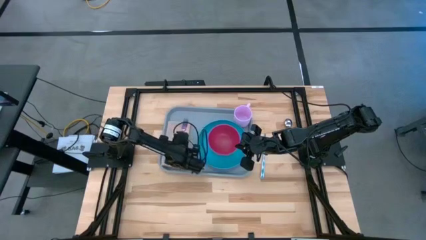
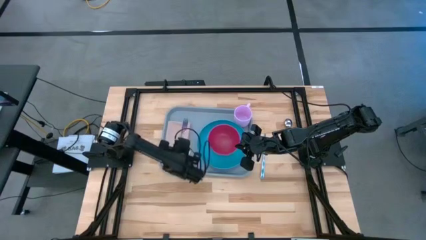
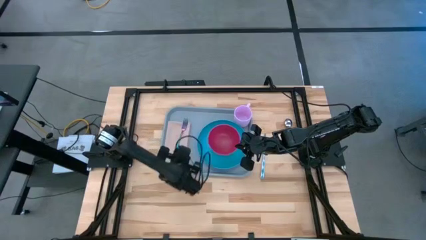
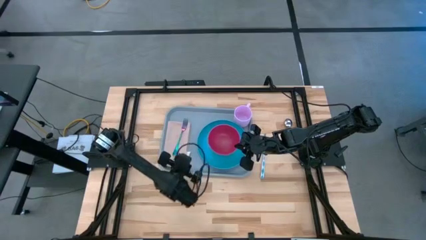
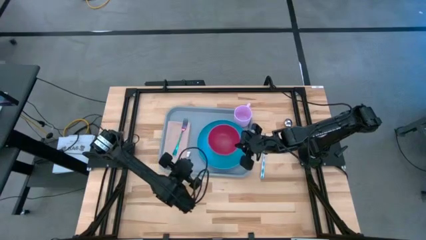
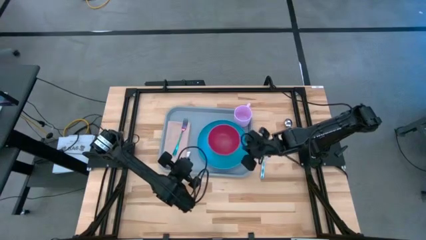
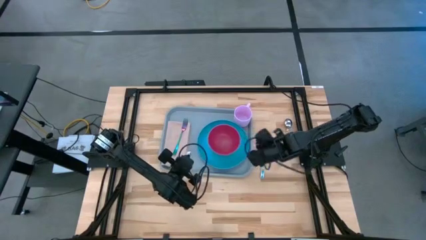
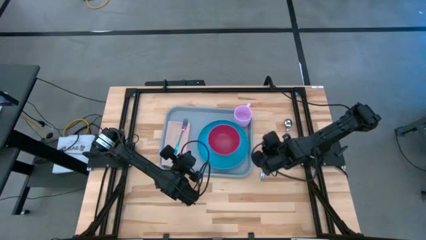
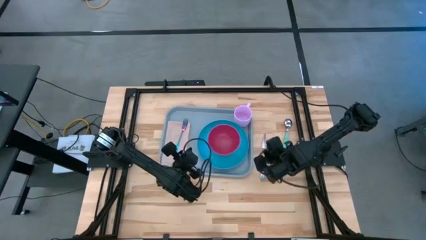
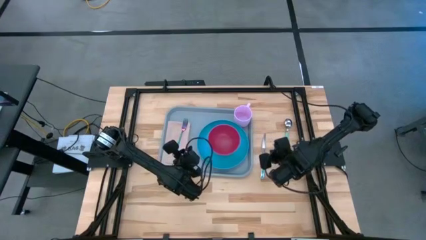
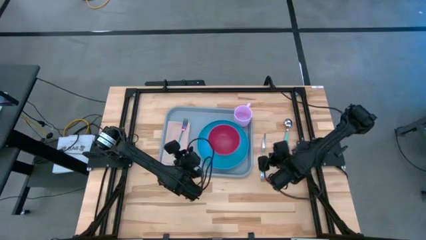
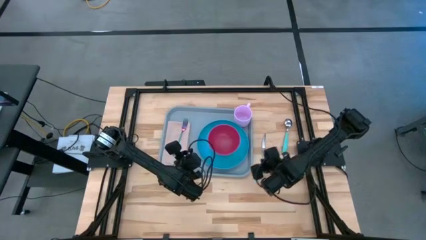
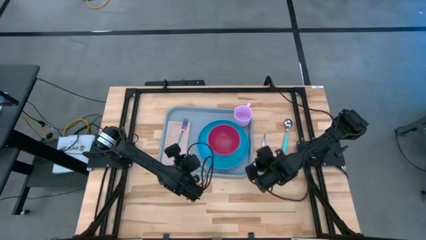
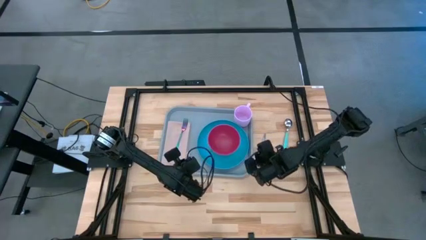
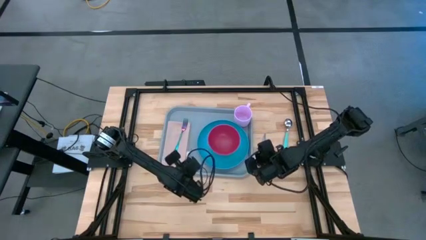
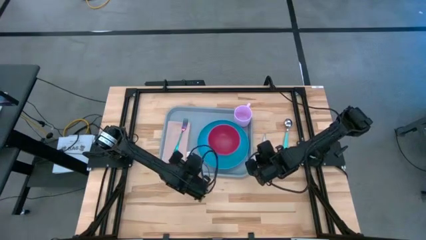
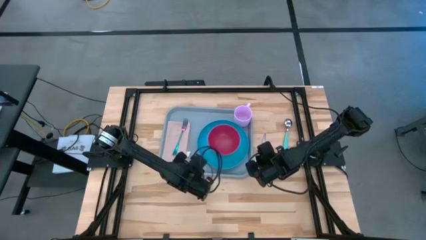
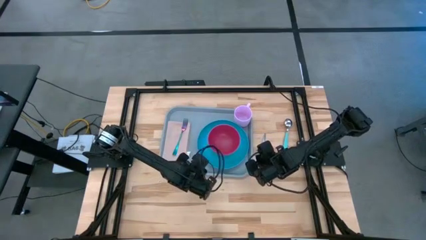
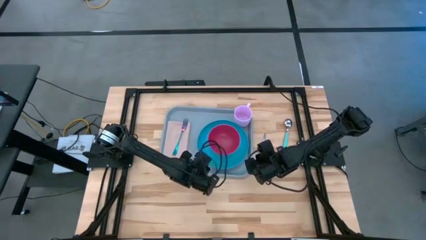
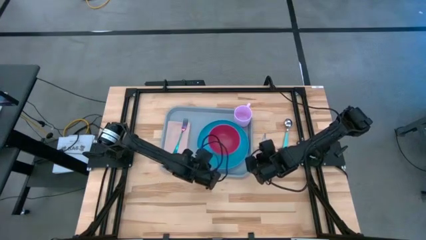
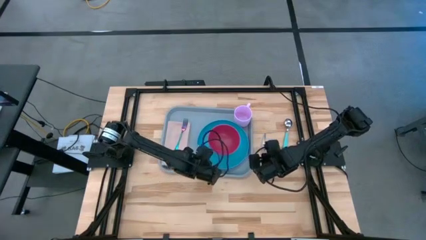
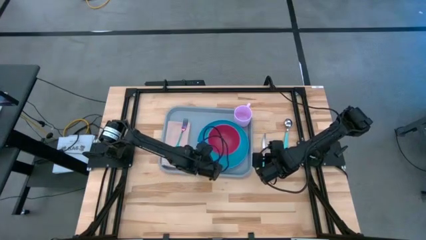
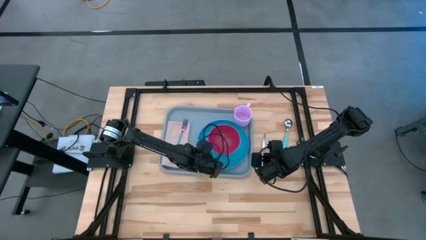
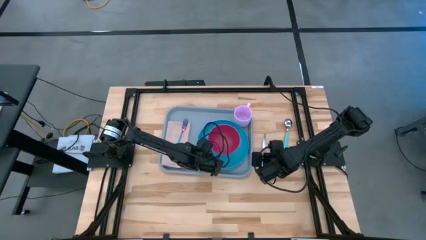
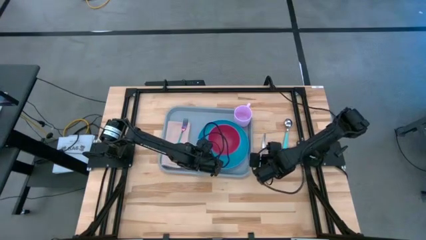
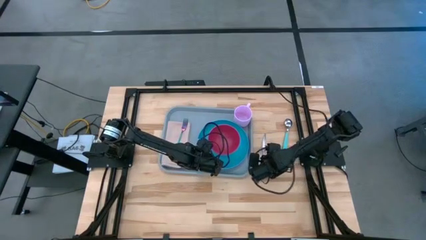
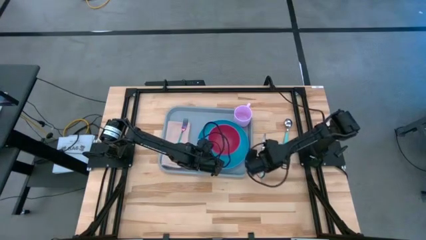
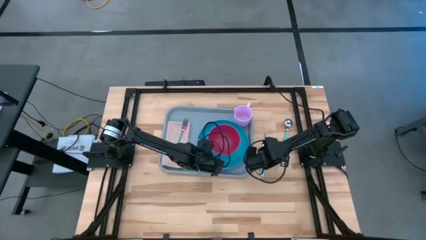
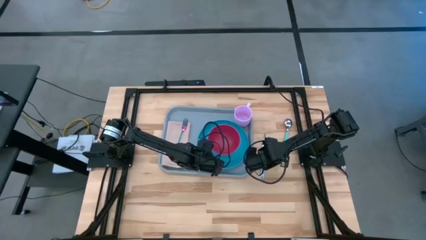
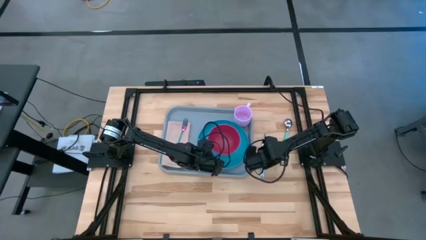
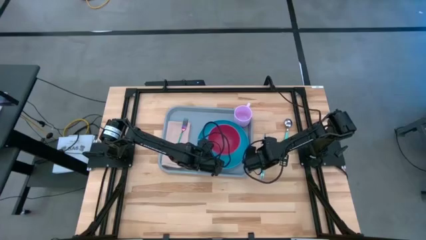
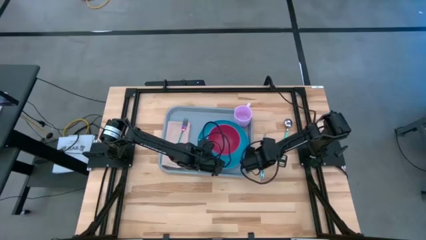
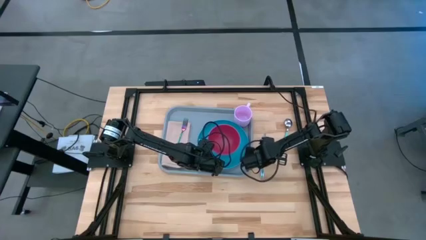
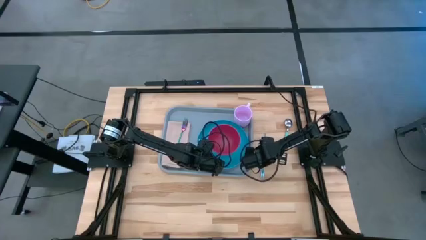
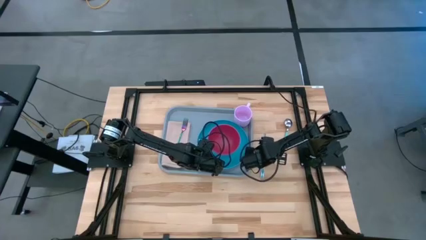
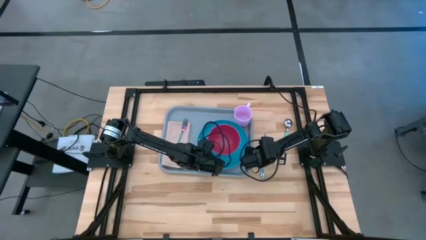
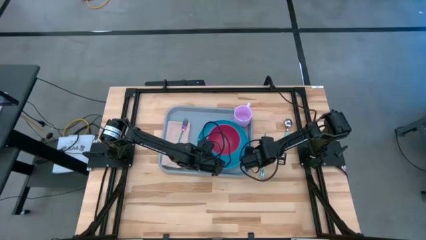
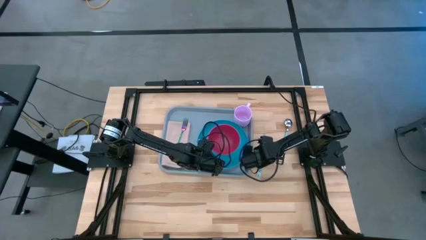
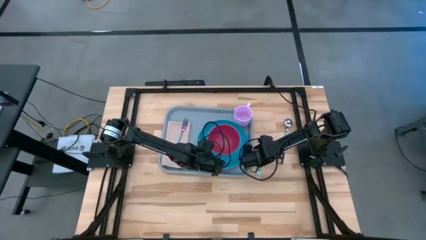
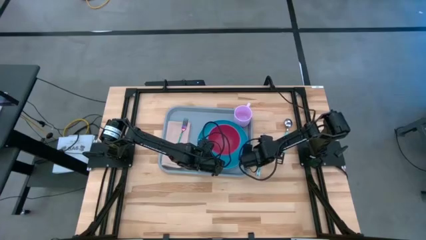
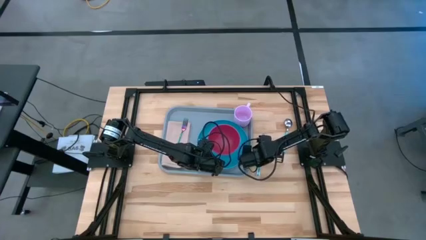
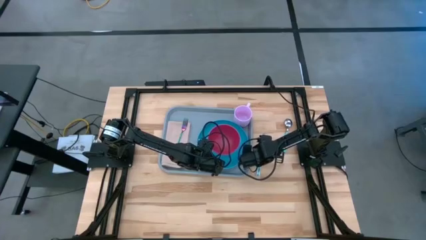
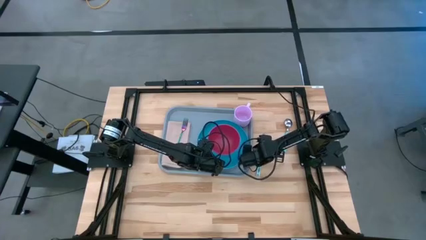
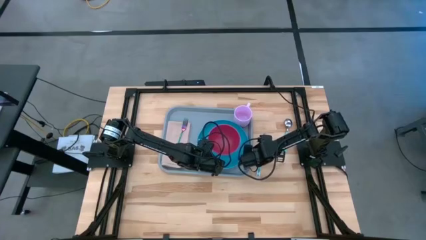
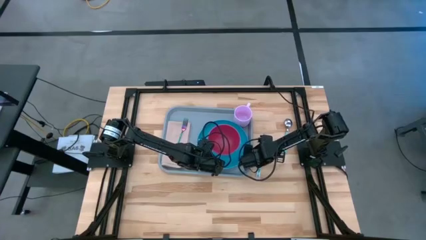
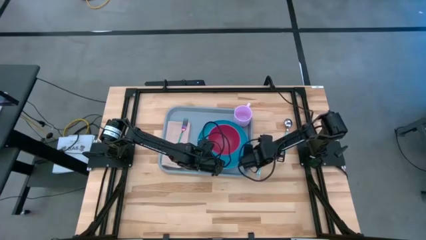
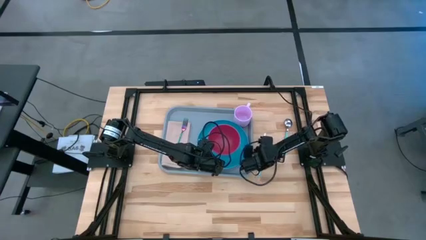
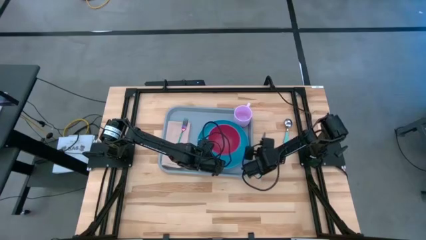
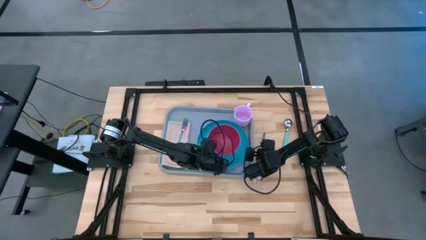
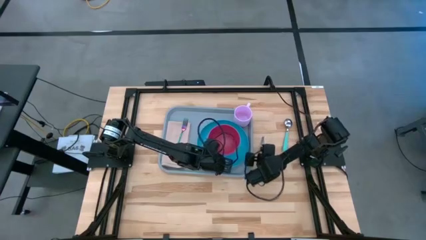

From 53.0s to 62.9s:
Task: Set up tray
Put the white knife on the brown napkin to the left of the fork

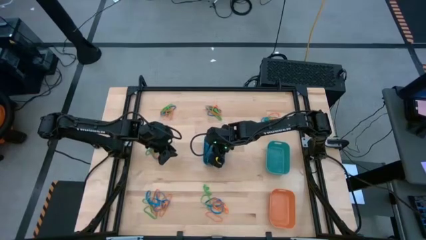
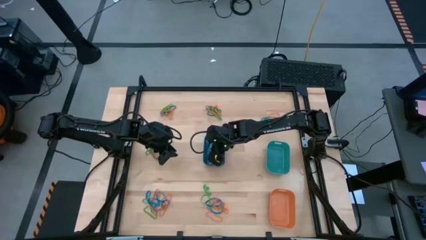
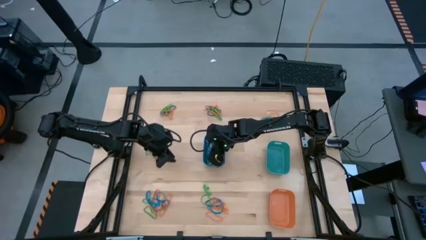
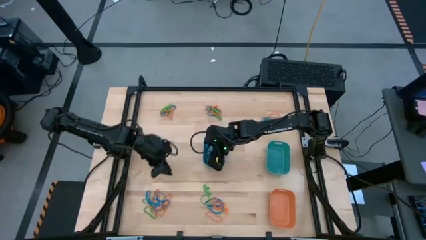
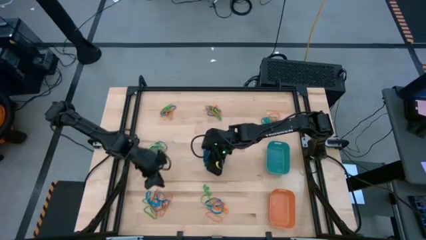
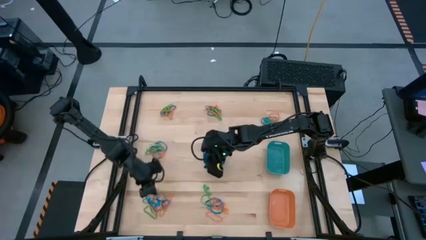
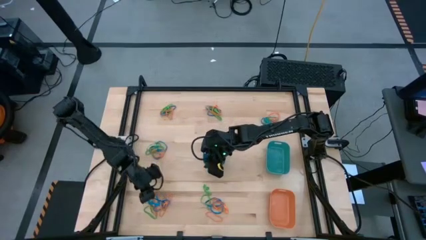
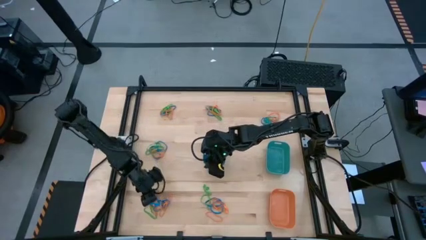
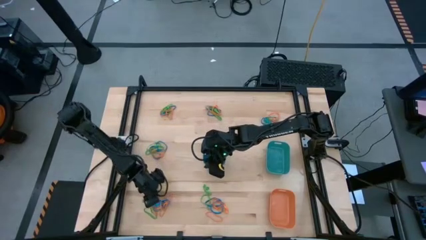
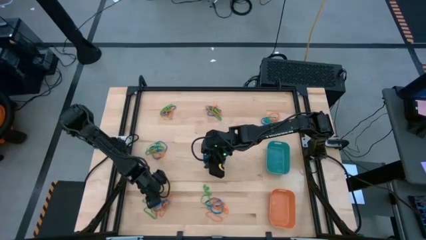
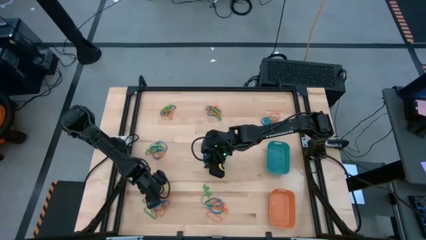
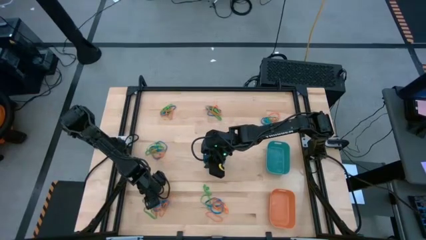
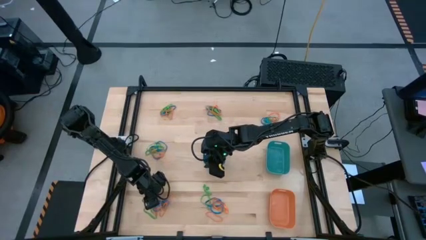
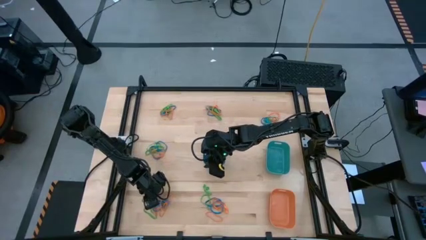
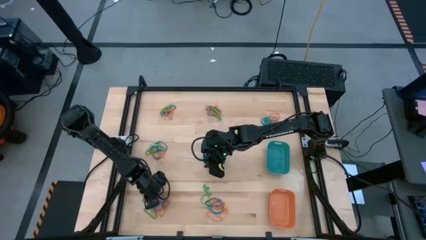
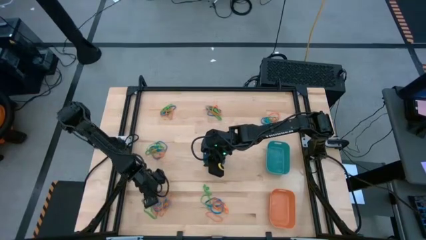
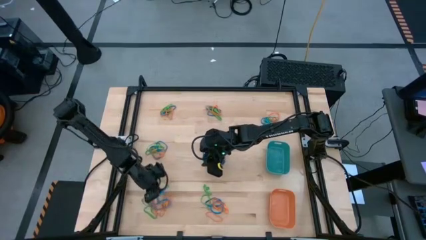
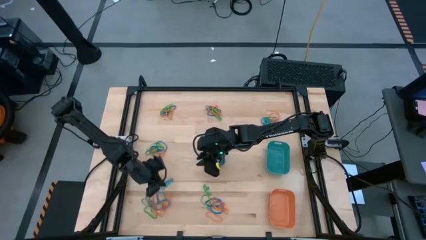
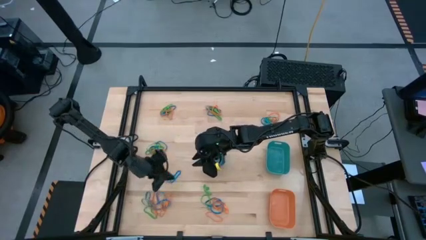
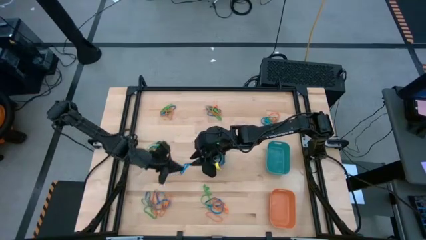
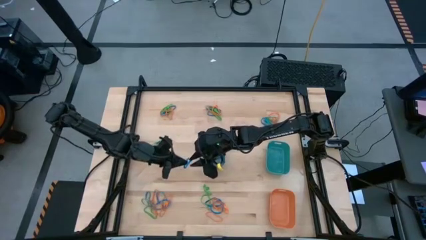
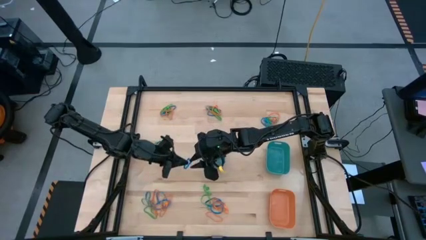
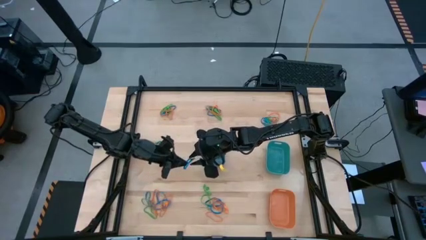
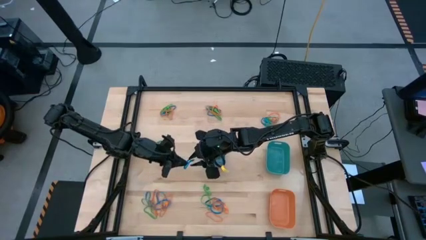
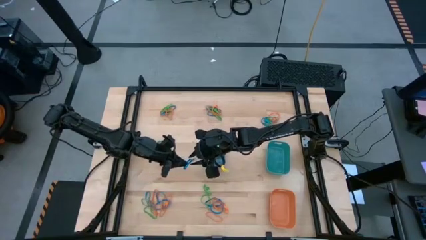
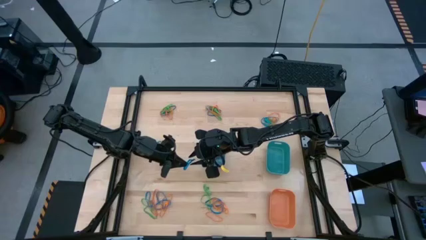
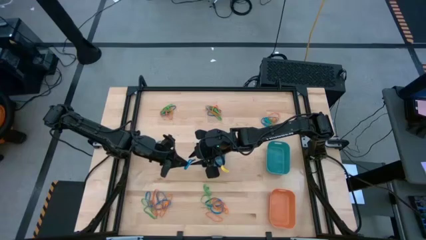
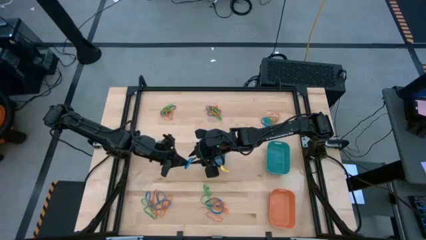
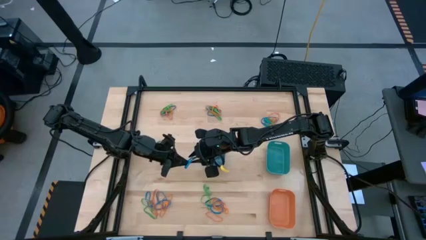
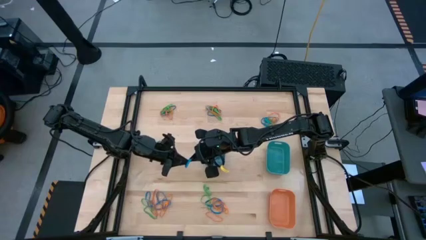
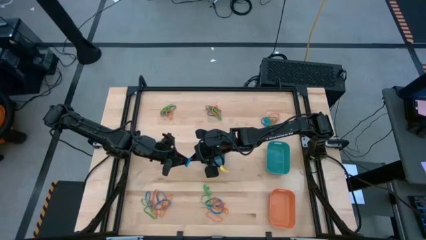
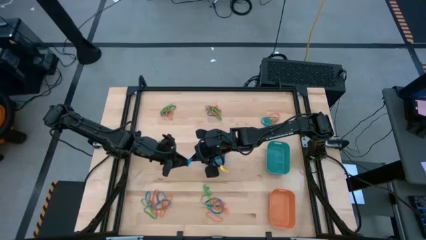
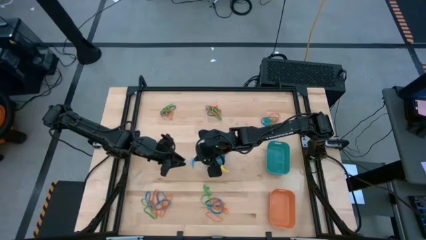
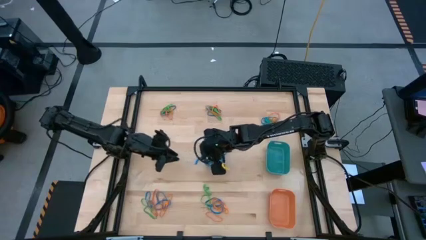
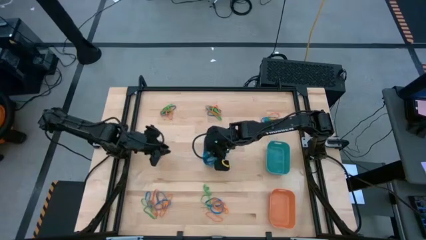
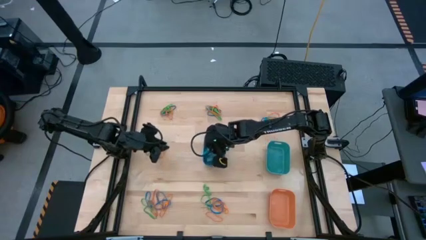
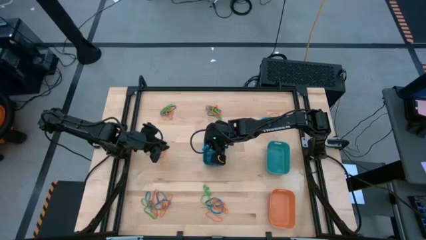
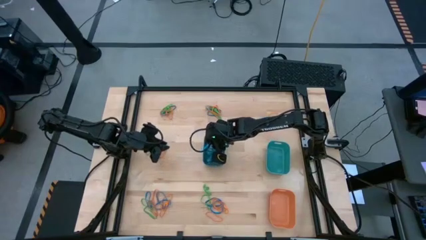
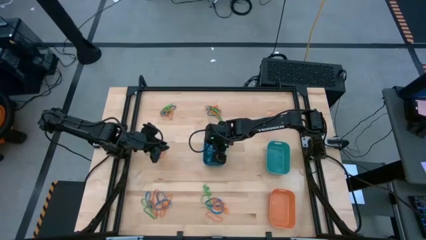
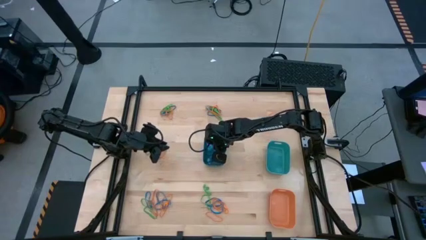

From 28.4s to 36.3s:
Task: Sort rubber bands into baskets
Put the blue rubberband into the blue bin
